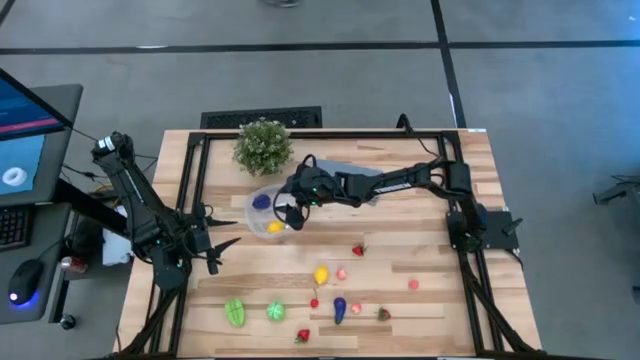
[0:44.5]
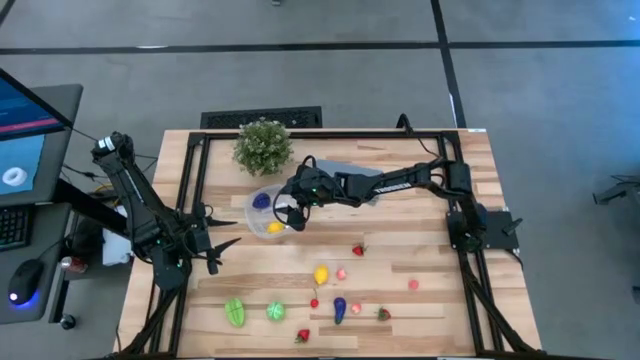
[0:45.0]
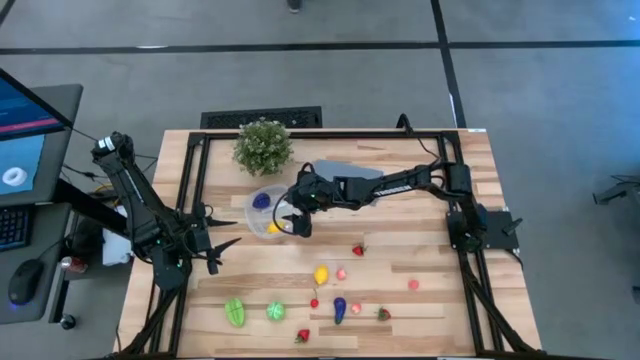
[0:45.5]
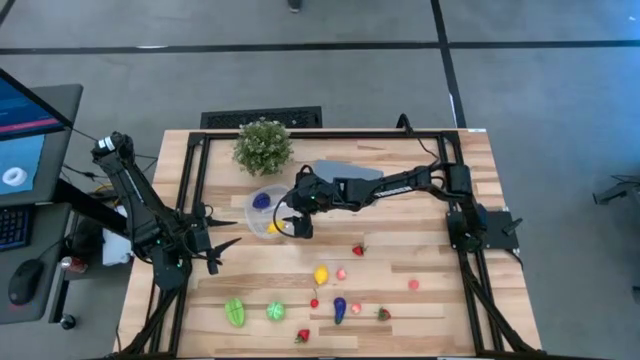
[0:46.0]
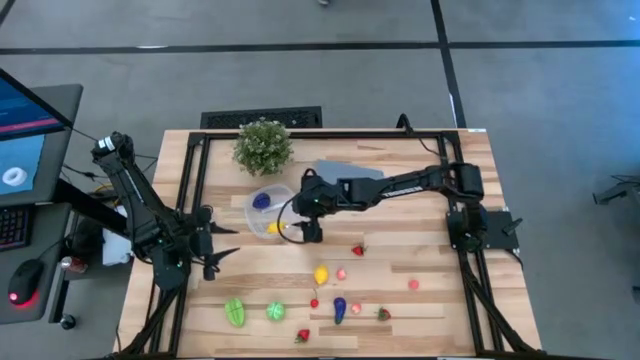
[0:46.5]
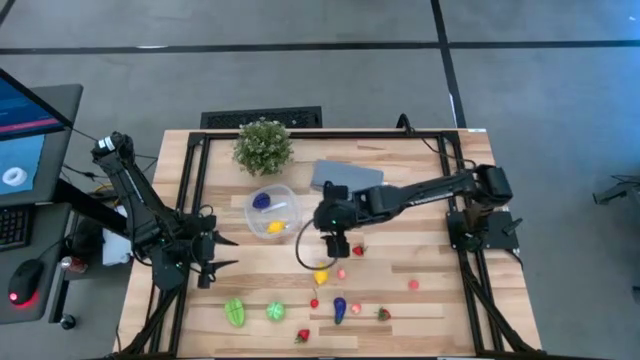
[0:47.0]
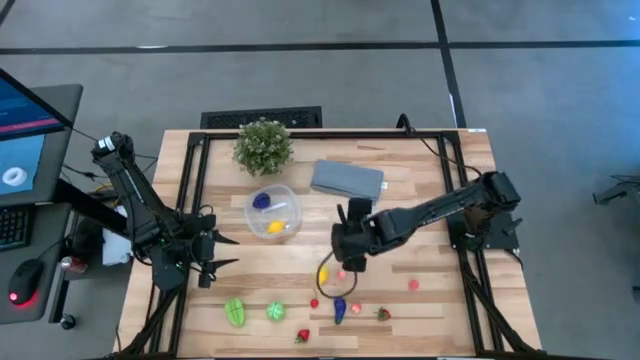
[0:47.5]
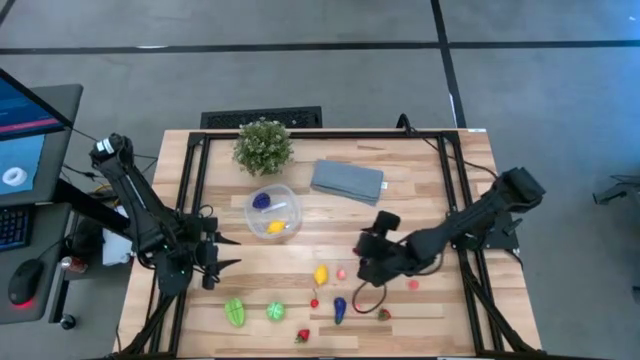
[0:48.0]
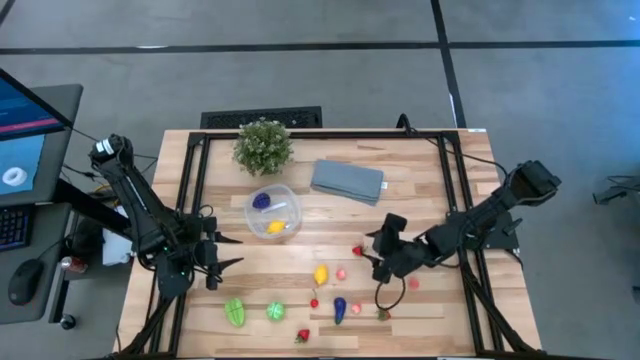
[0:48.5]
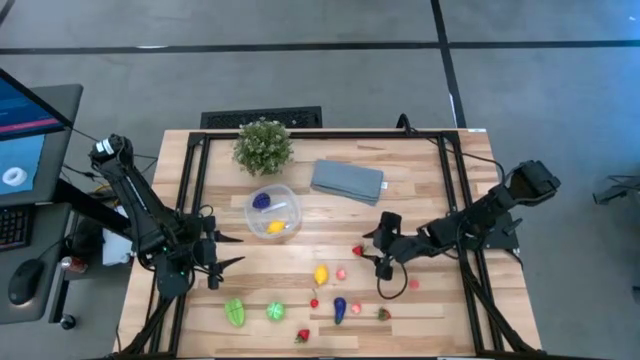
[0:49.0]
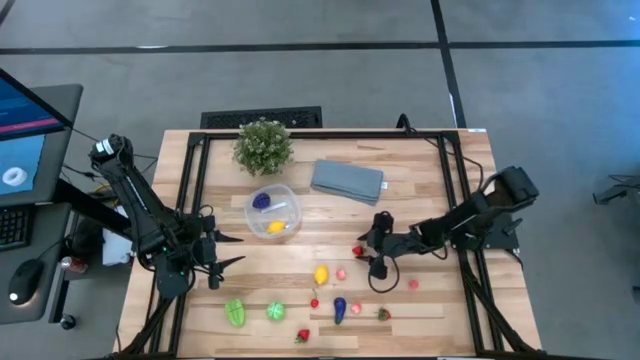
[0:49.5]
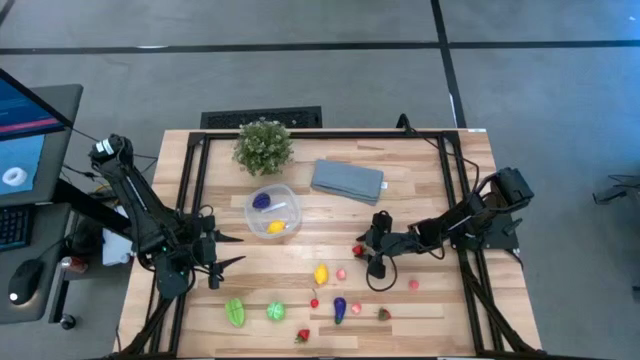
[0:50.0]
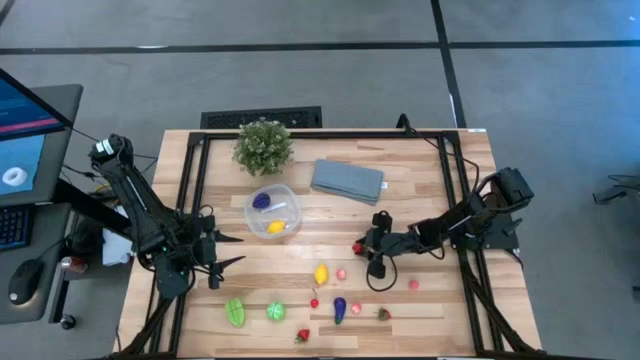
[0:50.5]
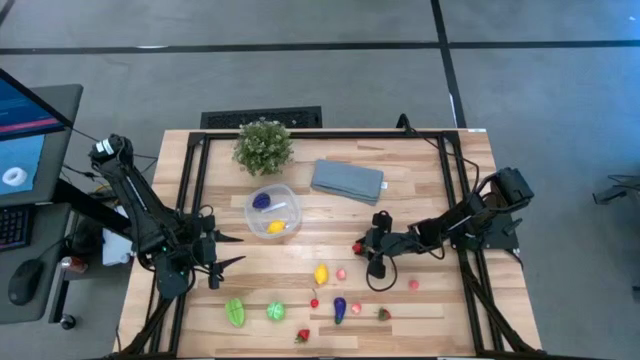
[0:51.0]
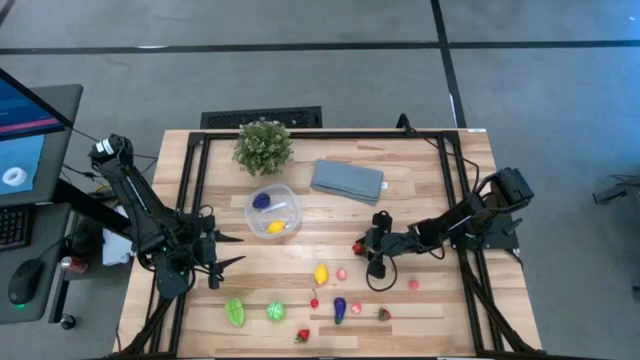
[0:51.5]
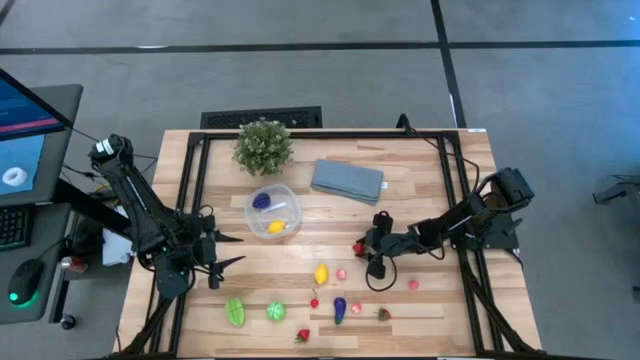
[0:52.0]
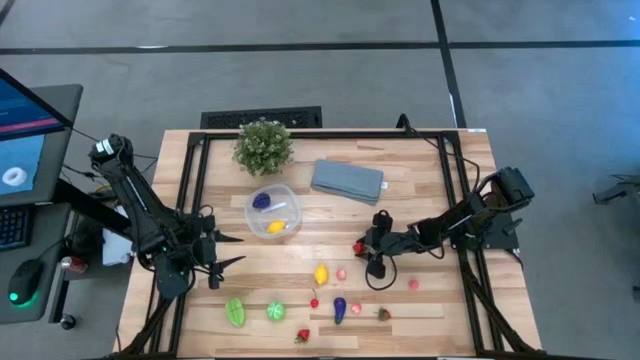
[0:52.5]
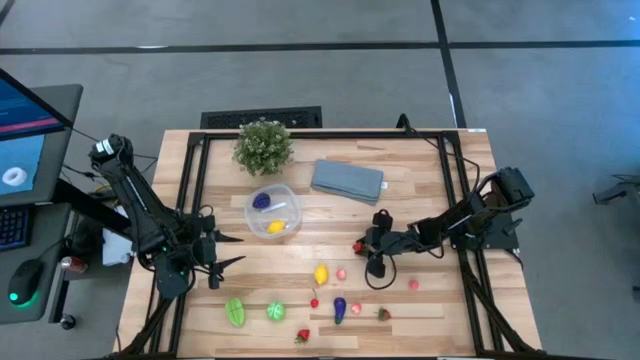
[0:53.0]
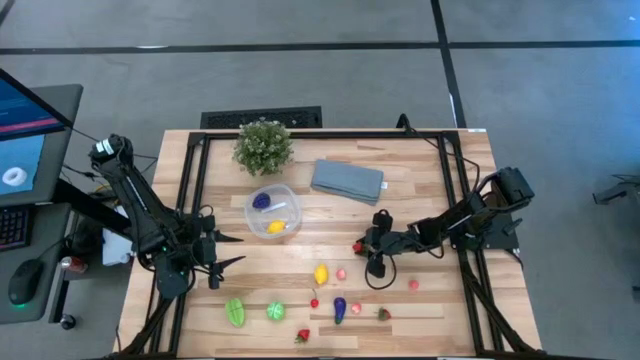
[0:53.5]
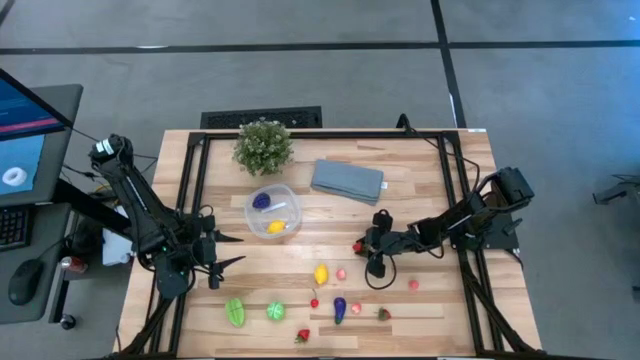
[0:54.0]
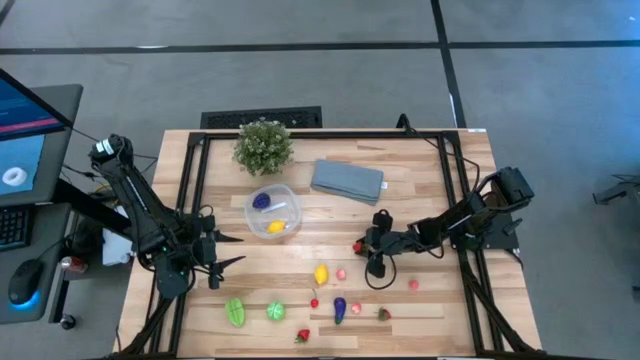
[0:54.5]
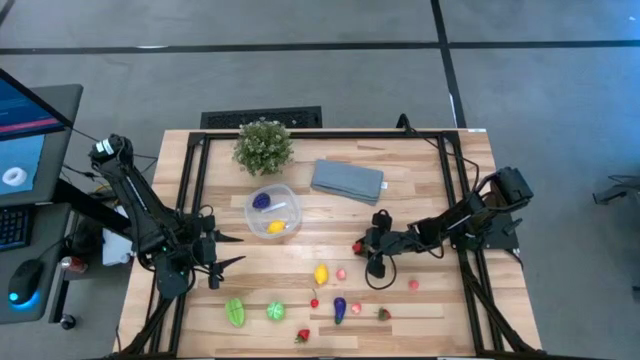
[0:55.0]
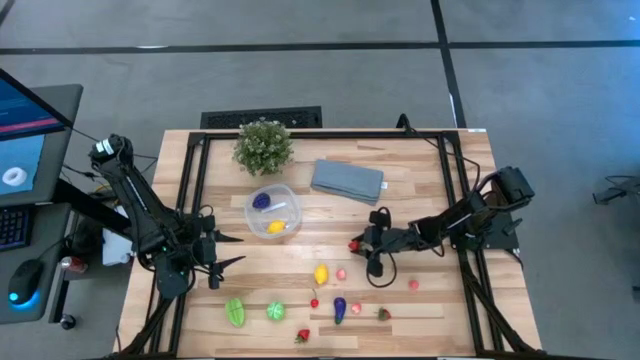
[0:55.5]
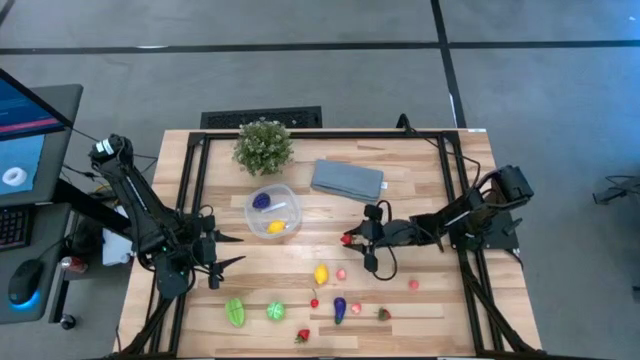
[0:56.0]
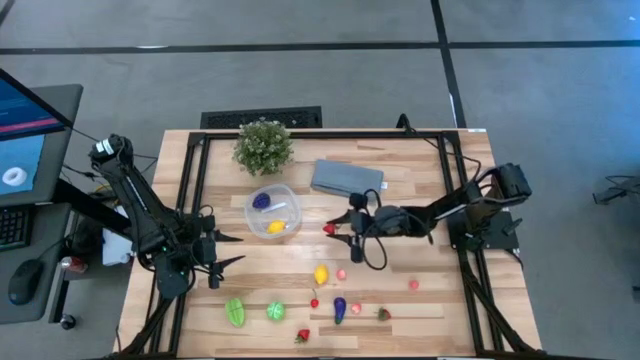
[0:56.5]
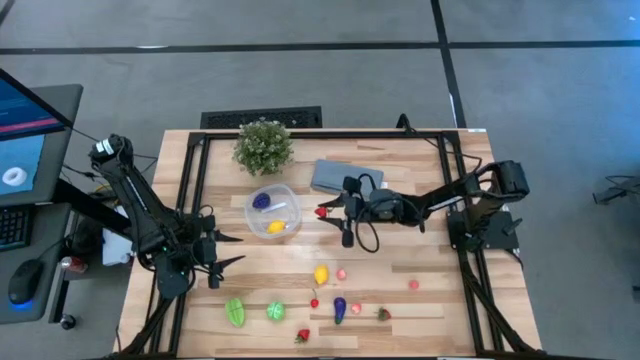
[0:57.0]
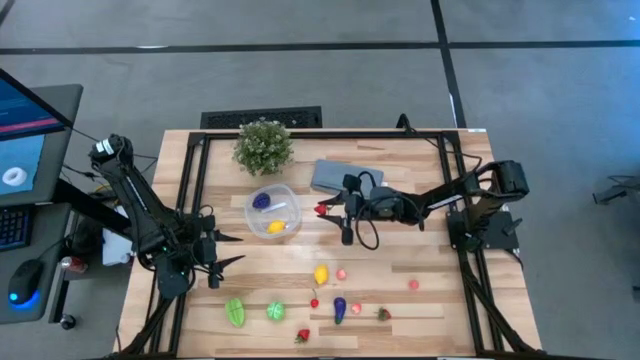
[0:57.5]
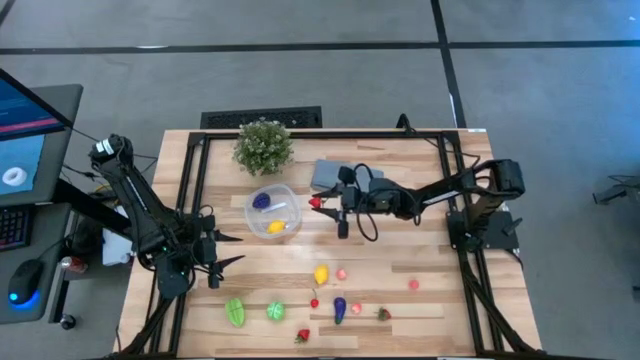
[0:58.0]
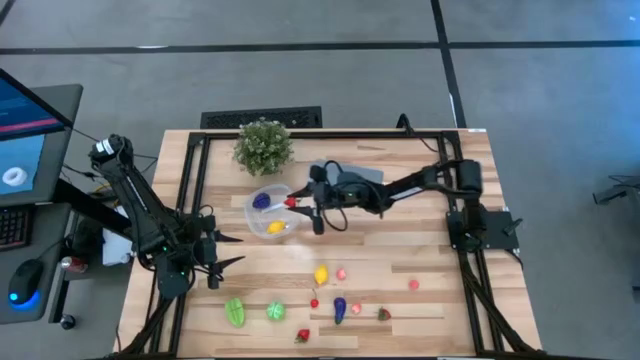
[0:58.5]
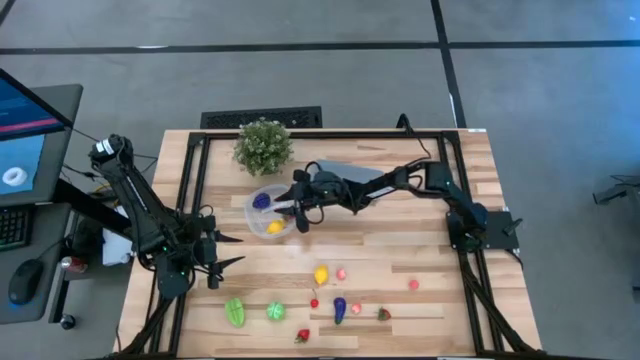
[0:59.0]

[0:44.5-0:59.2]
Task: Pick and placing Produce into tupperware
Put the top strawberry into the transparent bin

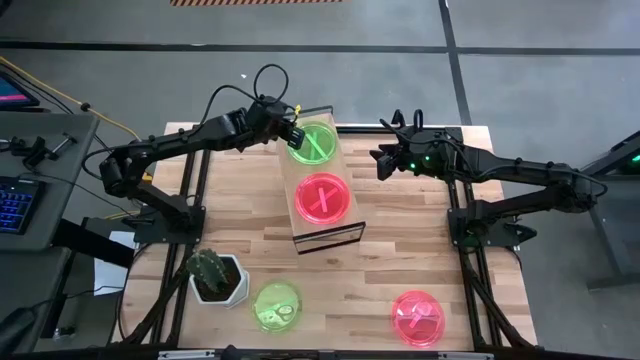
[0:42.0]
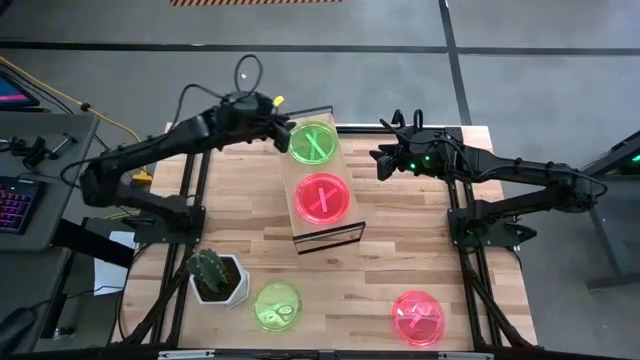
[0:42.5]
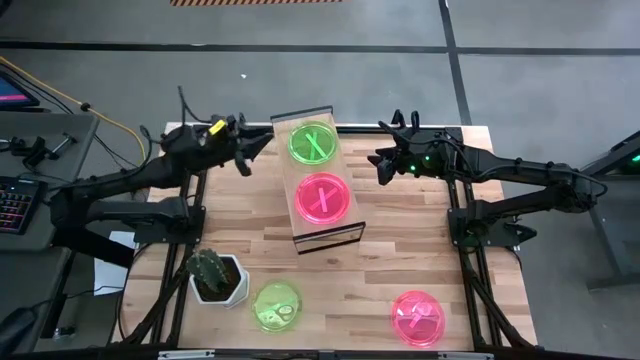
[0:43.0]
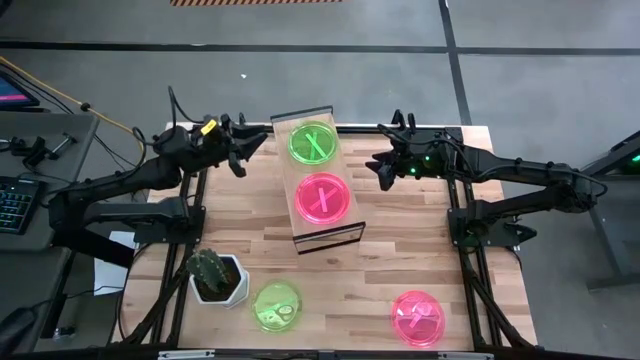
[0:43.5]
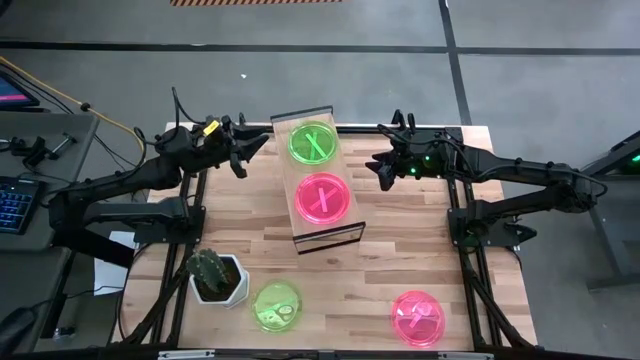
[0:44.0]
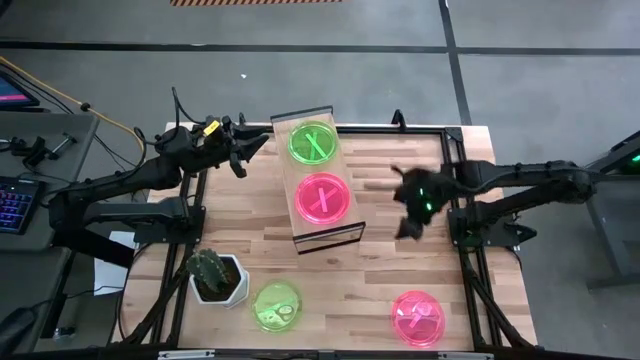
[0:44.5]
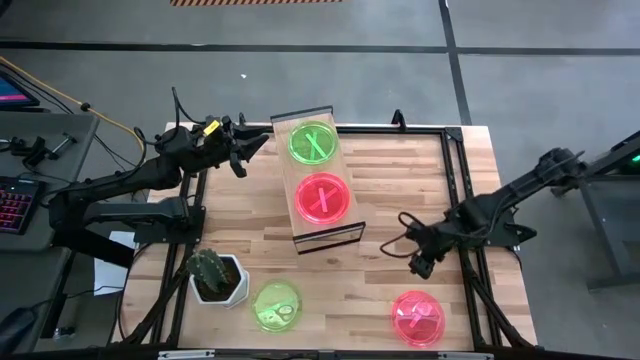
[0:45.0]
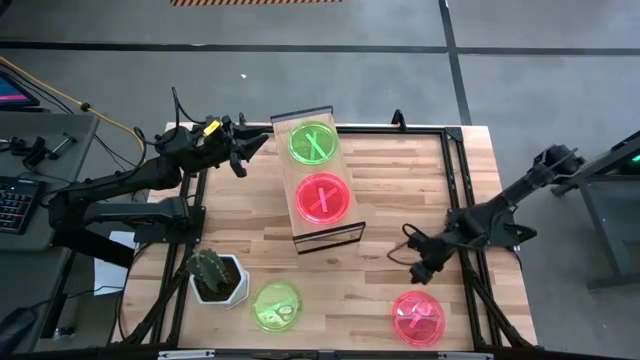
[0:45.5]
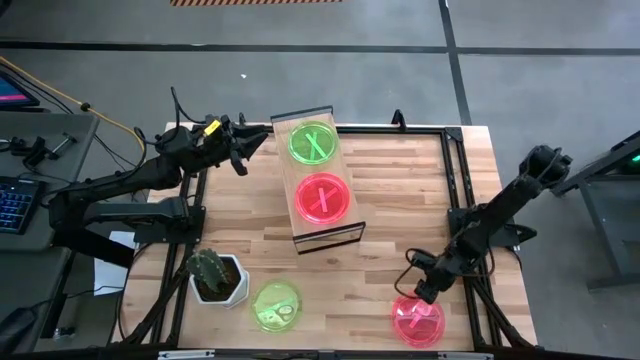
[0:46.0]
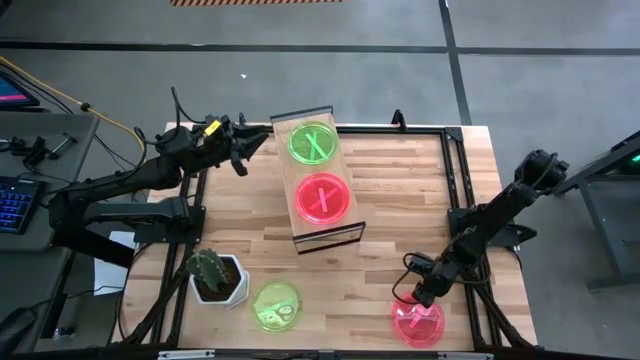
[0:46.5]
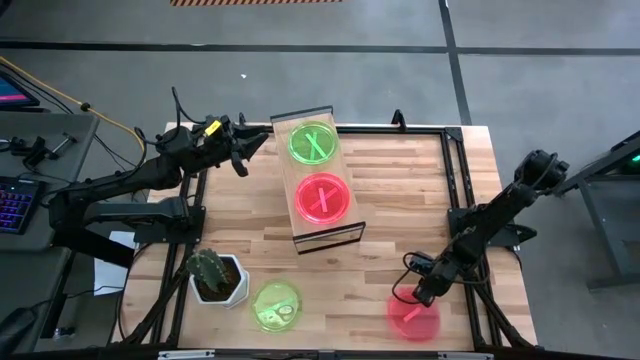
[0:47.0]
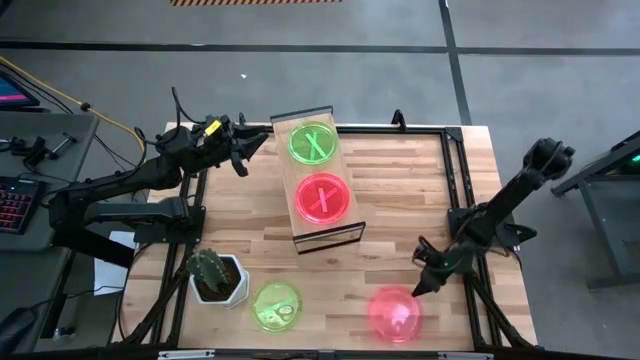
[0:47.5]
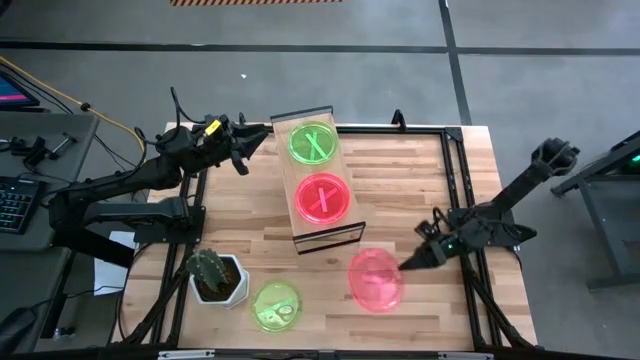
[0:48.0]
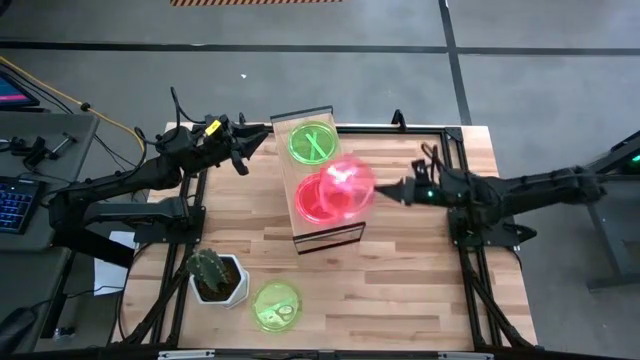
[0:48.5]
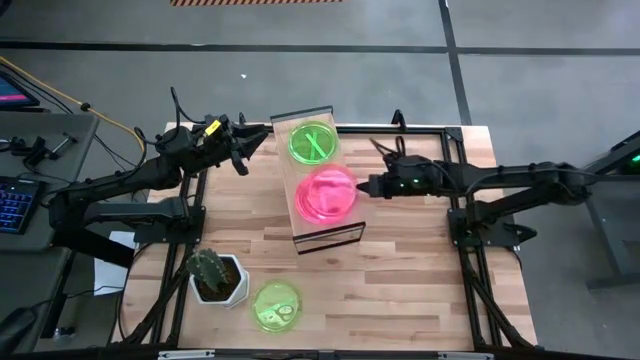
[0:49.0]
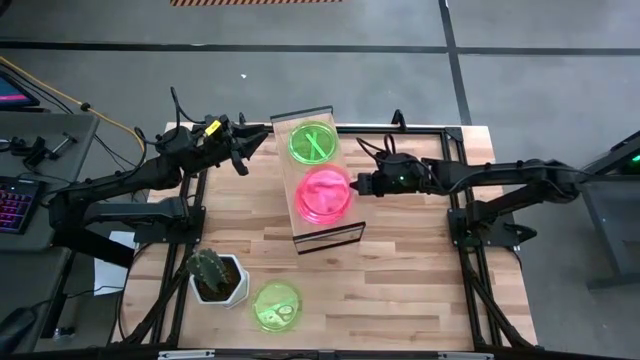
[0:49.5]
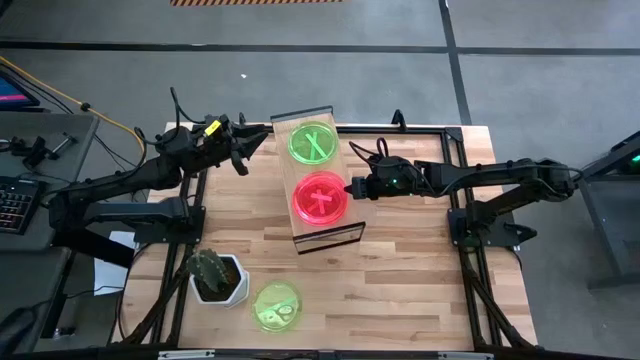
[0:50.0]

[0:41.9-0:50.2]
Task: Place and stack plates onto a shelf
Stack the light red plate on top of the light red plate on the shelf
